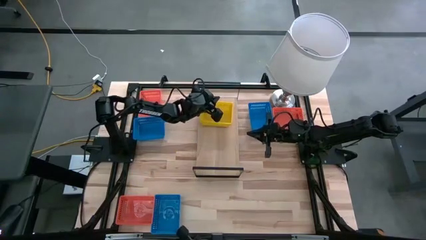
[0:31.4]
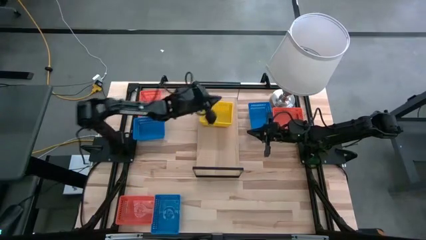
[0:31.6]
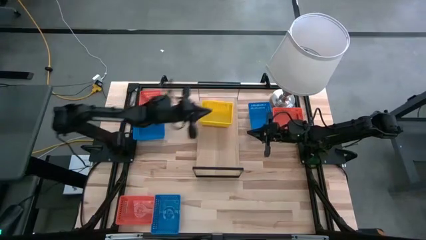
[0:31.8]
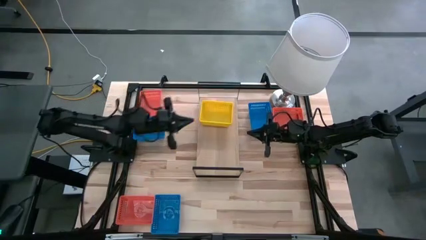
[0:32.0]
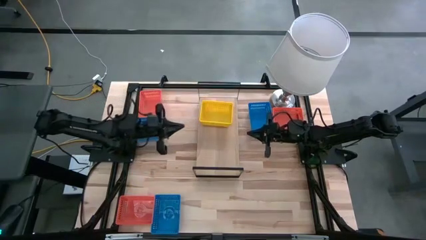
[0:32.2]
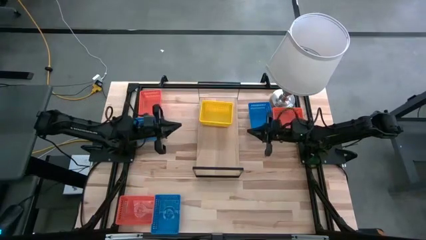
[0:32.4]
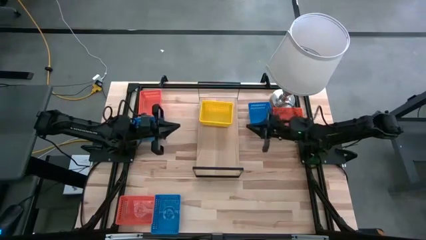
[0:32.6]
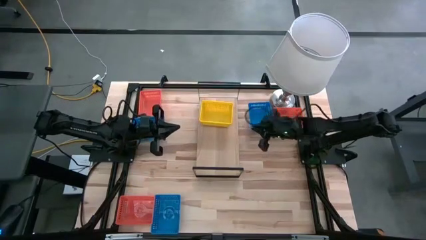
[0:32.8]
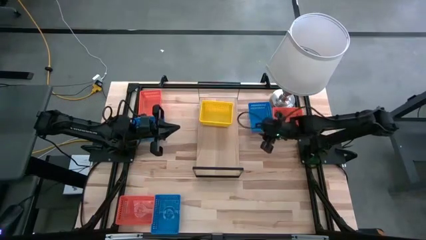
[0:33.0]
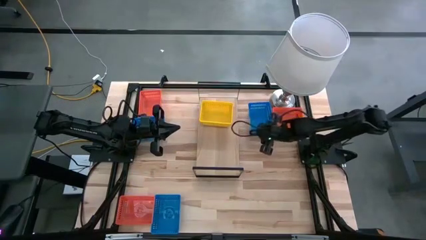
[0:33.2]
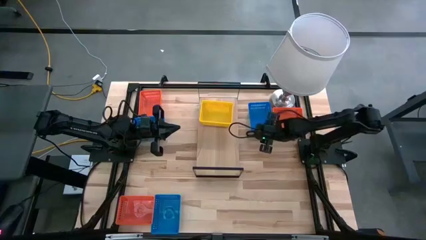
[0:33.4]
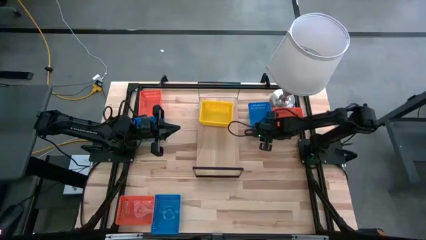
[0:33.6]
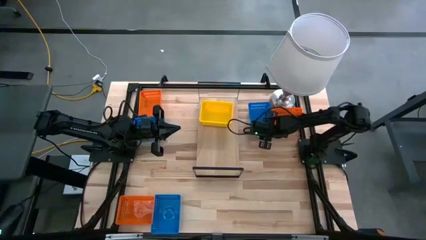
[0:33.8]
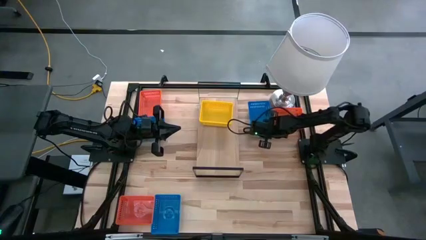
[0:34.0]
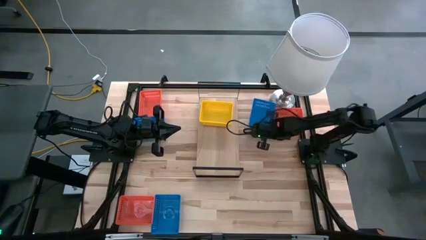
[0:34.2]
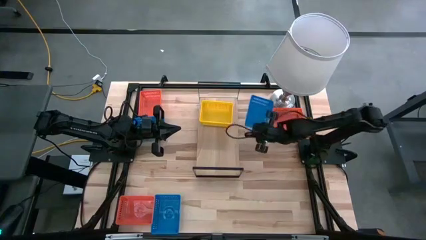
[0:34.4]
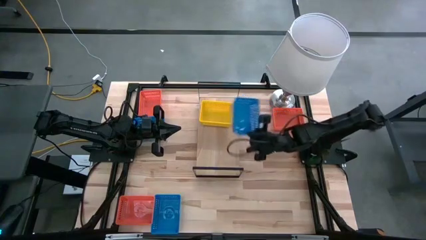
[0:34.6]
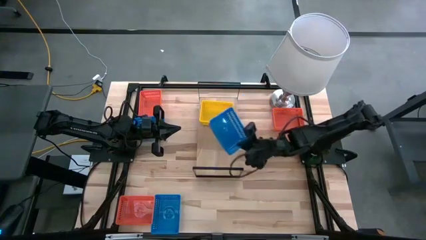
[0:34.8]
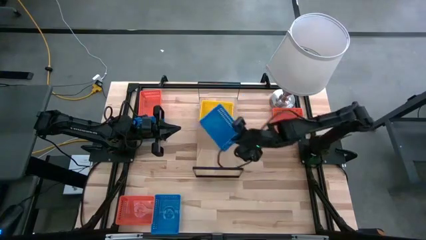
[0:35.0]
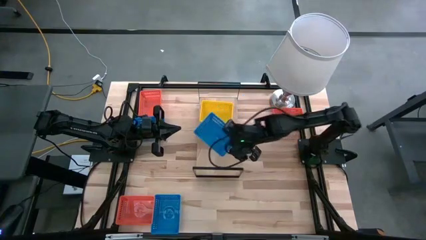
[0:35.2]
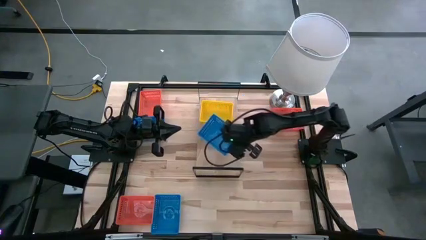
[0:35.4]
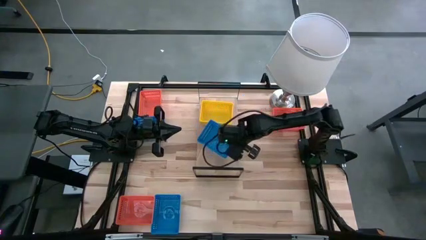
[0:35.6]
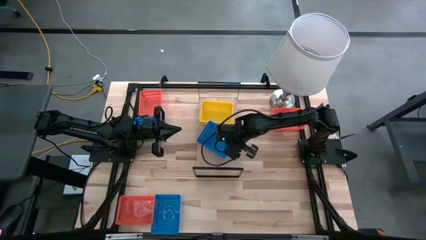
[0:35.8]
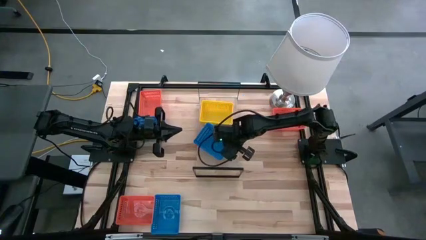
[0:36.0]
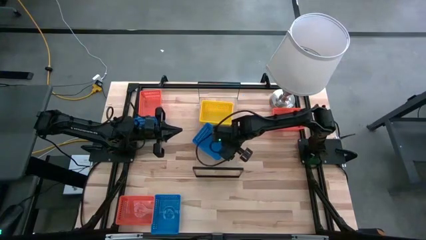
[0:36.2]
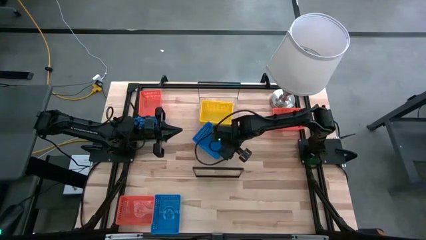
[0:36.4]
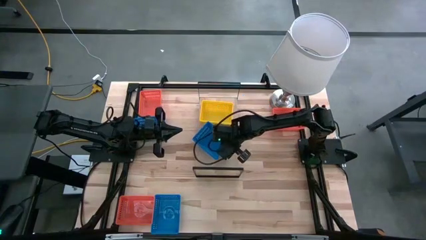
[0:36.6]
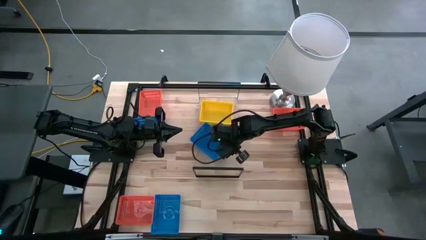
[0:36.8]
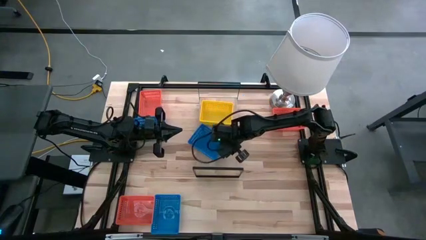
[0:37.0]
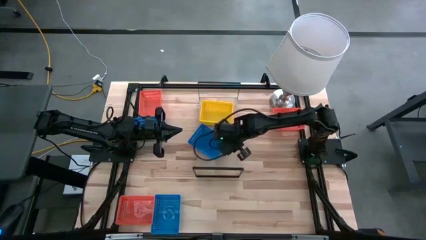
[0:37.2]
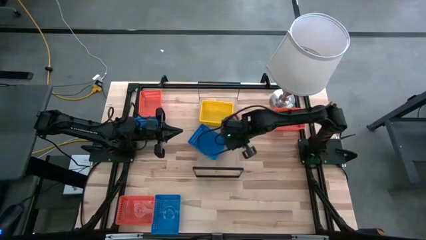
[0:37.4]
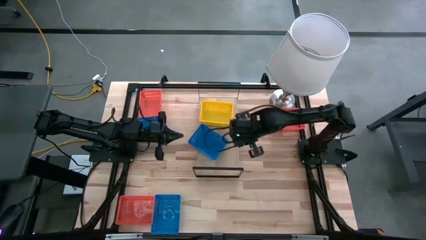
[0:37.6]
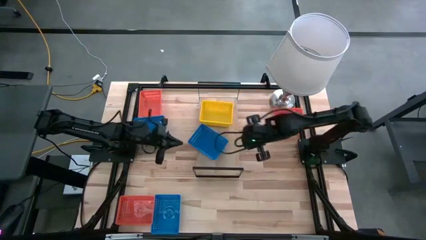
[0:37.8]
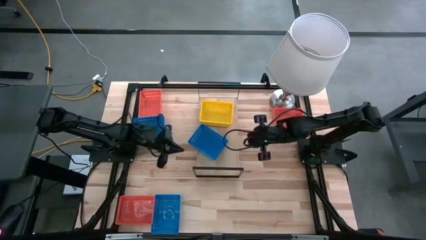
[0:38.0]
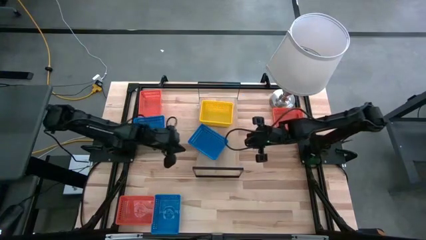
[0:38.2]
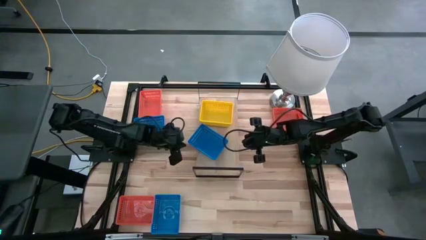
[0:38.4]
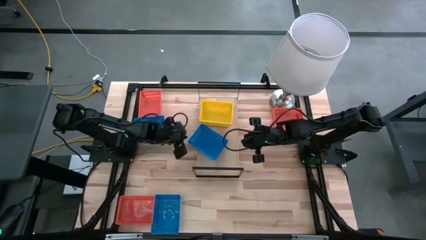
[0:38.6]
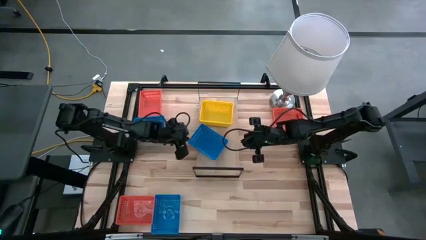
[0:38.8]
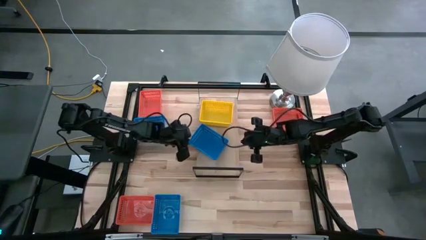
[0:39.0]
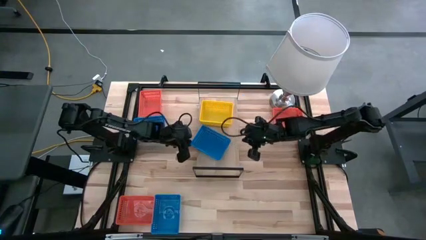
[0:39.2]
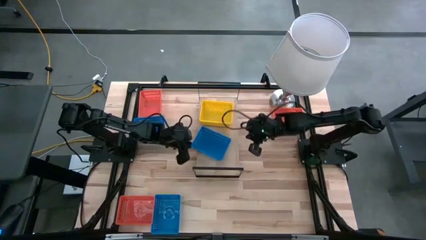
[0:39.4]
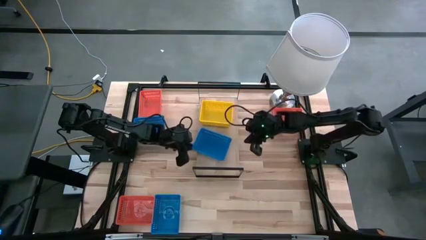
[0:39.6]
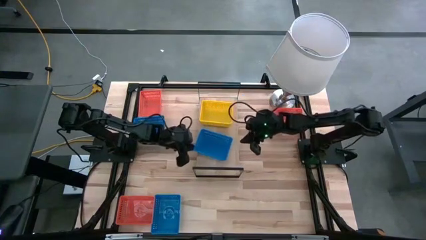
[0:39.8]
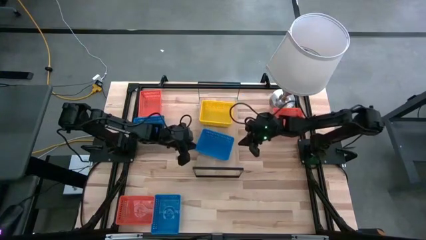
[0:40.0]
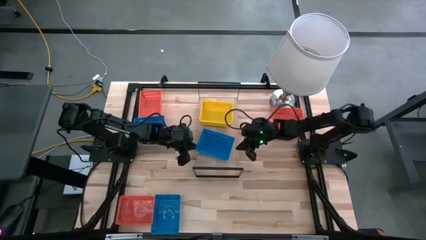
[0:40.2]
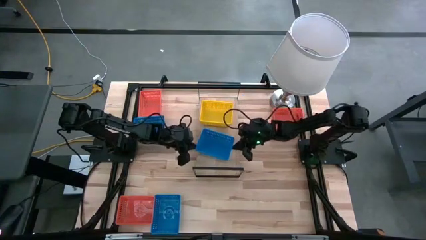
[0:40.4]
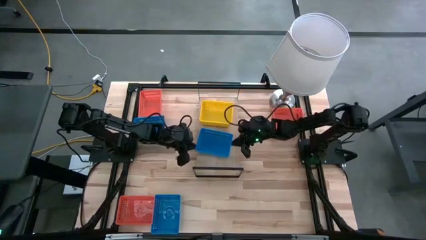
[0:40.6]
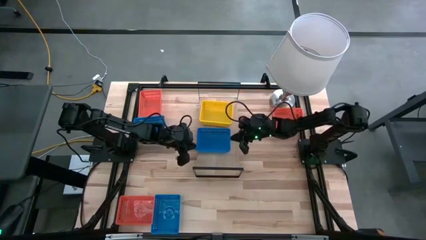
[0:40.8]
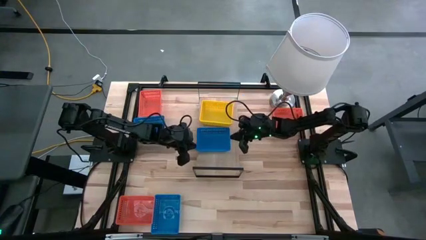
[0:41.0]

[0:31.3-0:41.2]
Task: Stack baskets on shelf by color
Put the top right blue bin on the shelf

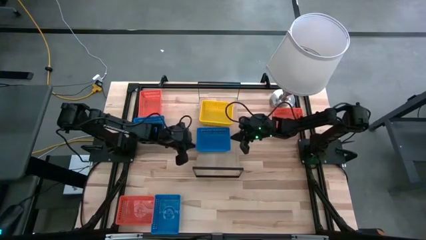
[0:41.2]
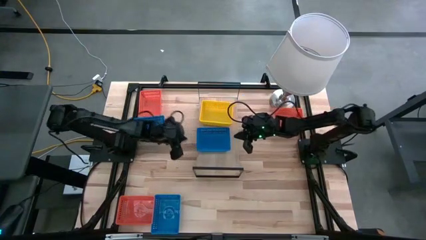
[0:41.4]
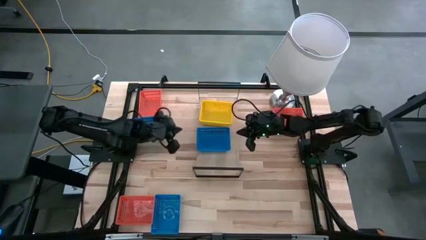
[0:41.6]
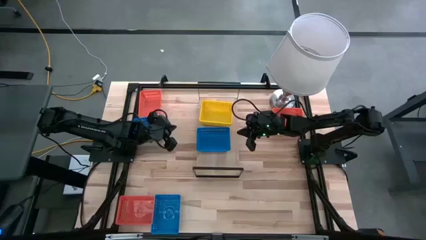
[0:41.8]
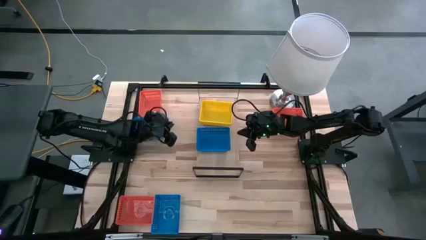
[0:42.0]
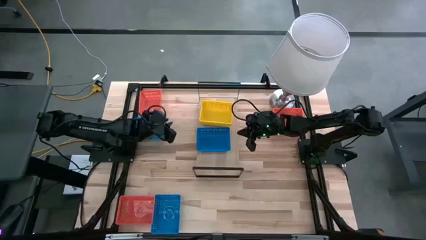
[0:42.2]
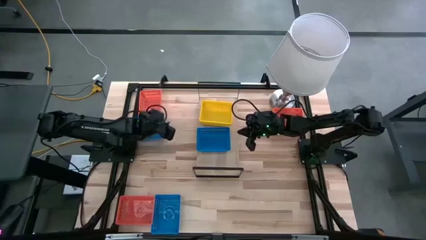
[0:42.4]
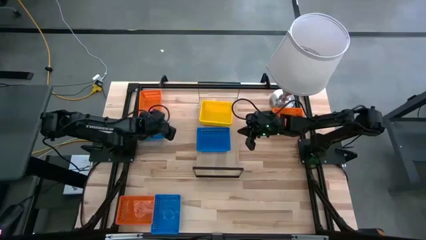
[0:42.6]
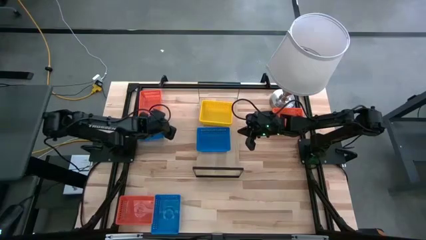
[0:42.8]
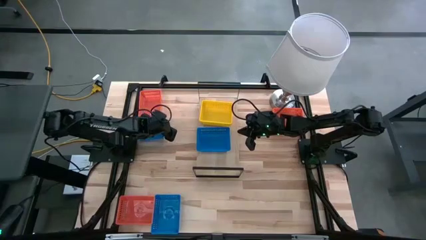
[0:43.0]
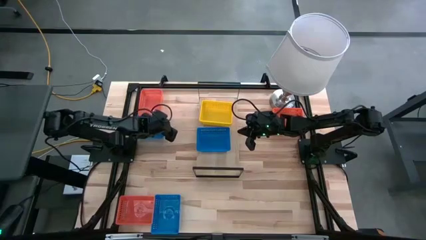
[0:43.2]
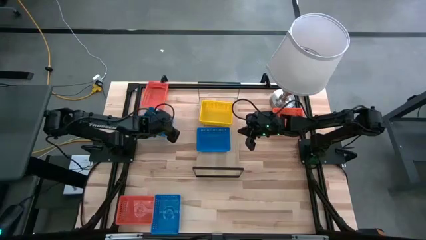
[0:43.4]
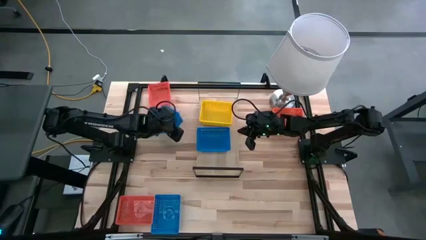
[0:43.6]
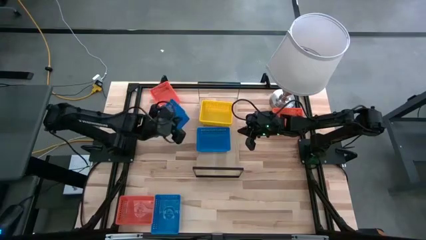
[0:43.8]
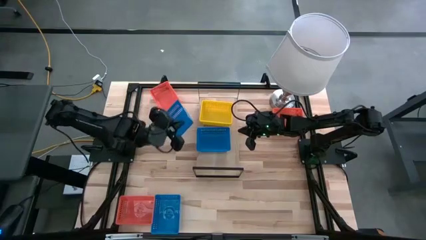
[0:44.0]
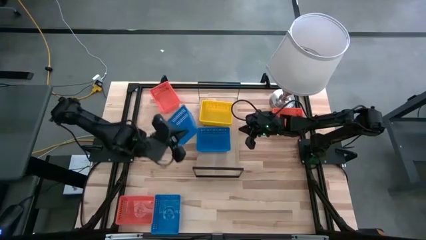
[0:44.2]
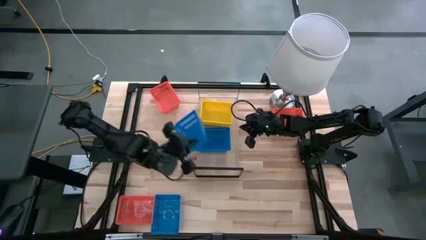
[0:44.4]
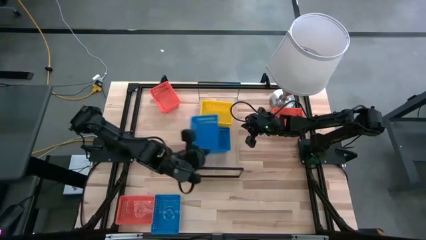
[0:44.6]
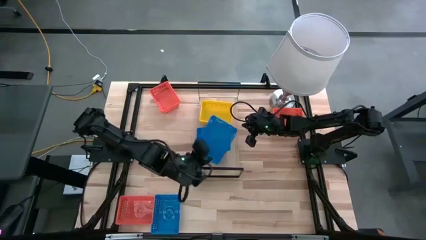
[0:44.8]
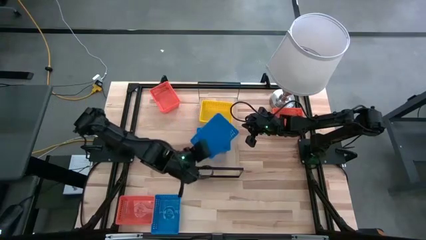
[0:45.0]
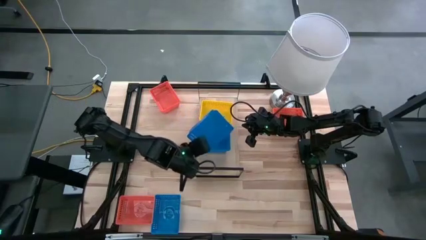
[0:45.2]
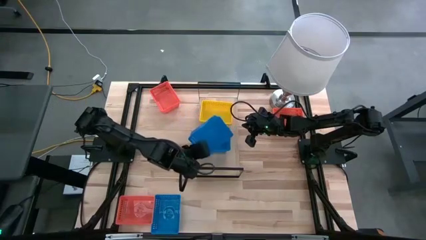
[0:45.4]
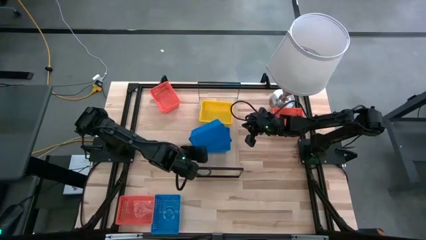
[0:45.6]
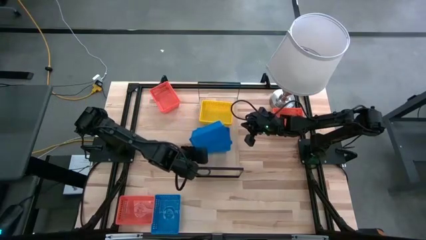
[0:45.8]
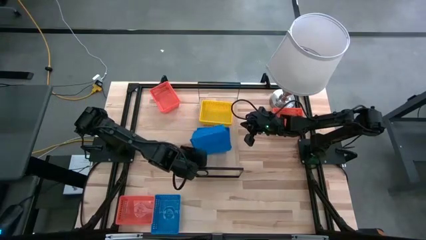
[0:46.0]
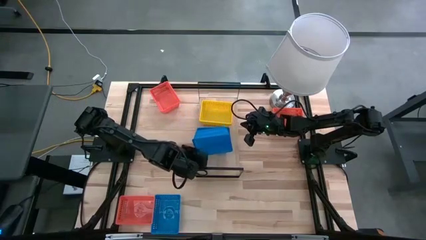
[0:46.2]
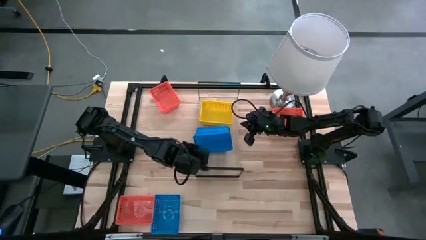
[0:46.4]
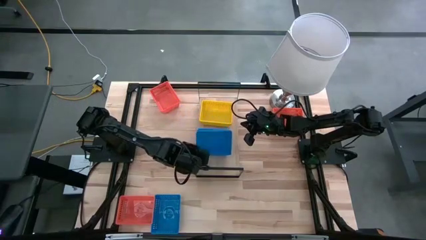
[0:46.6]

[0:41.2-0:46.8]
Stack the top blue bin on top of the blue bin on the shelf

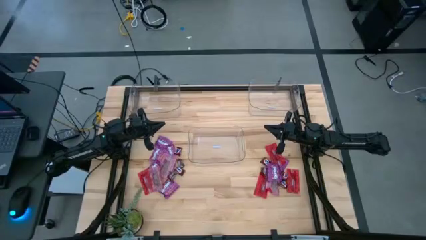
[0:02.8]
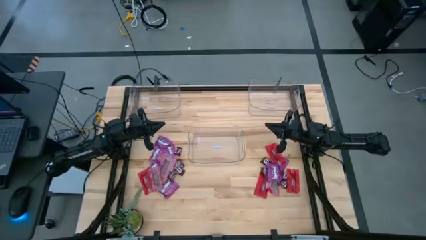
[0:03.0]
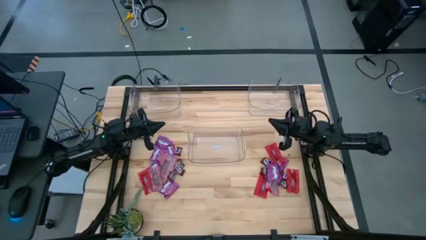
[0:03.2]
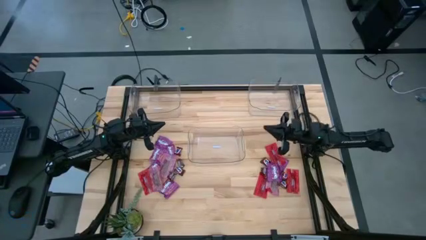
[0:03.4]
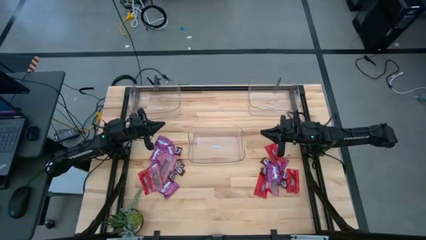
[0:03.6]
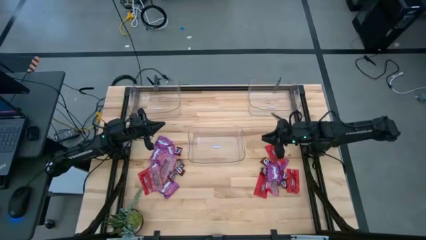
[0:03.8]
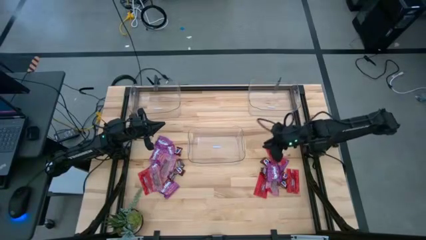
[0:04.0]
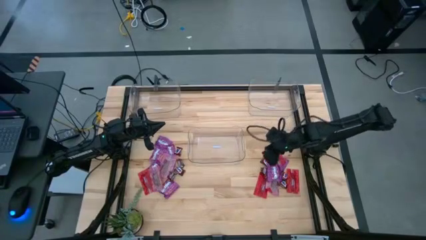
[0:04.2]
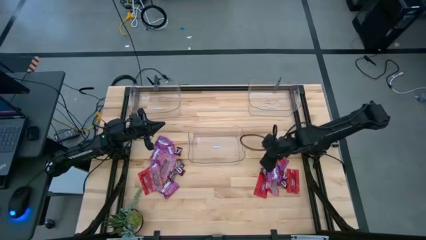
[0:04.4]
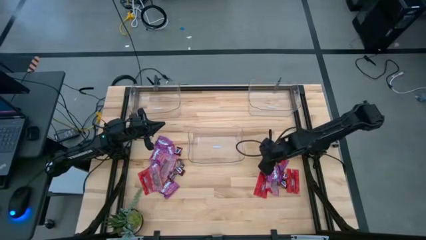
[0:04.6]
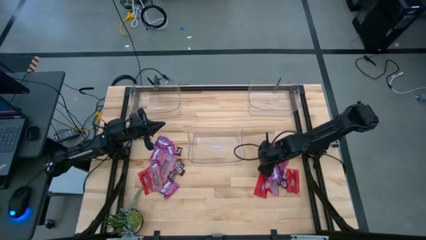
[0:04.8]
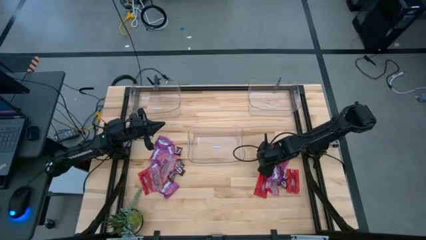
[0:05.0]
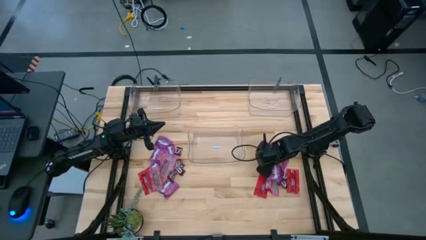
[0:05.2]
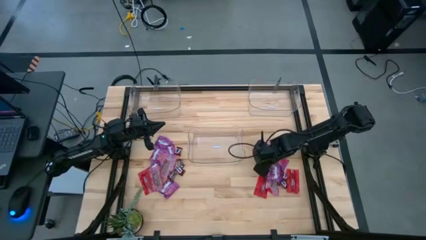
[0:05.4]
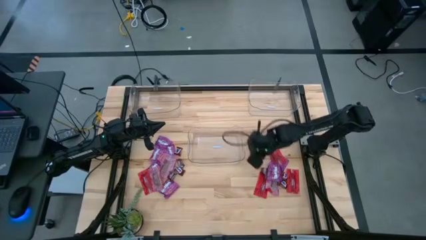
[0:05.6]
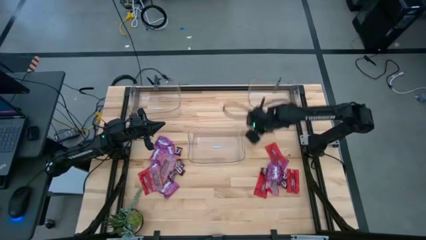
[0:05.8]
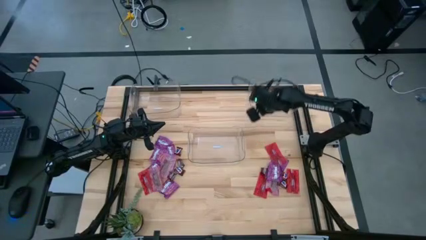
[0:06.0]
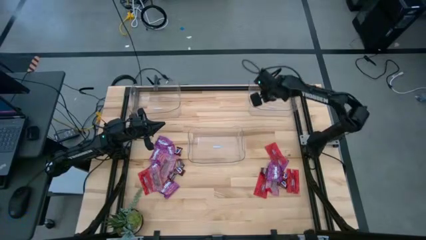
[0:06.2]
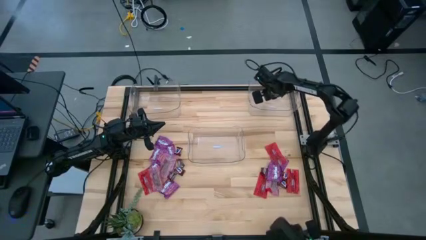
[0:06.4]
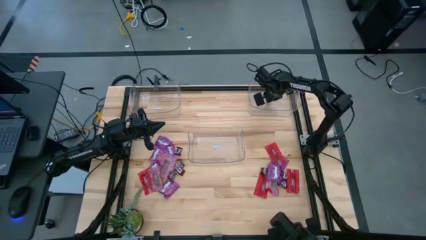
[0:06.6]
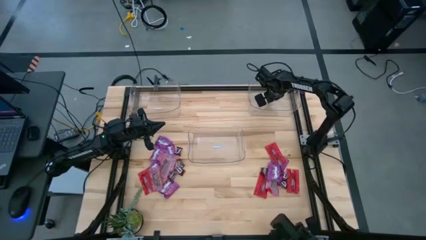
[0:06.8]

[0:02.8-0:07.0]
Task: Sort candy
Put the brown chocolate bar into the top right transparent bin
